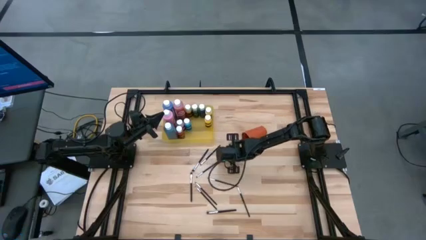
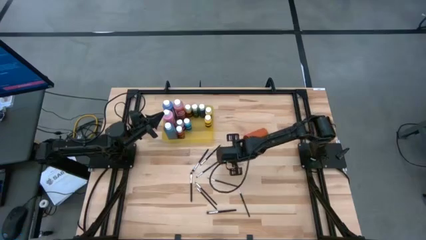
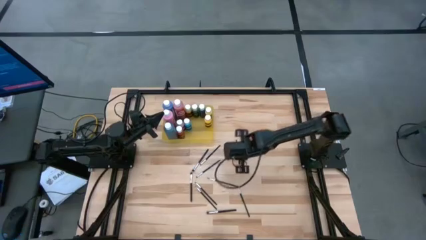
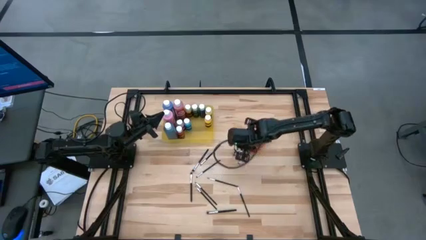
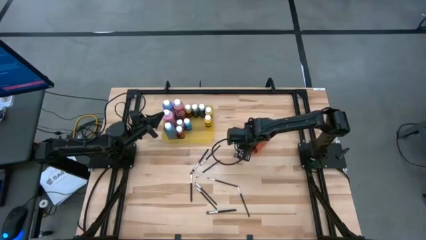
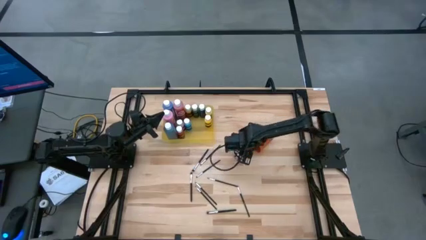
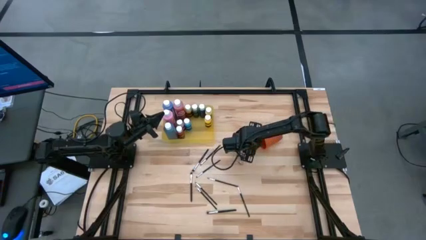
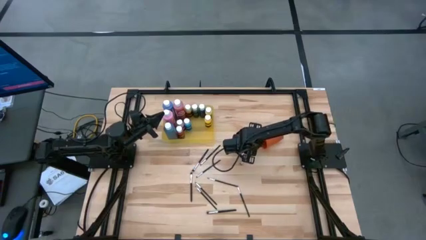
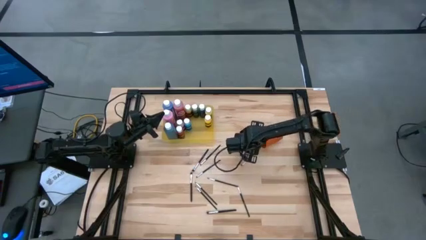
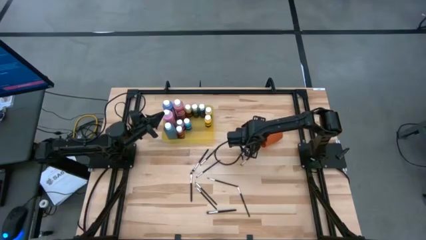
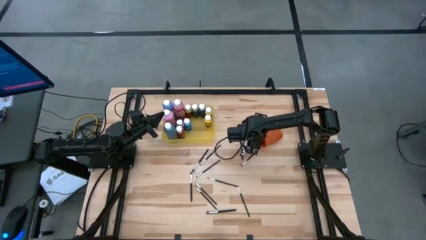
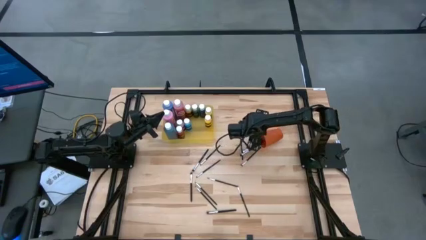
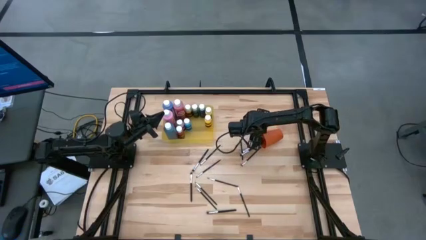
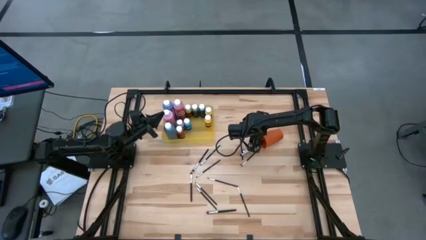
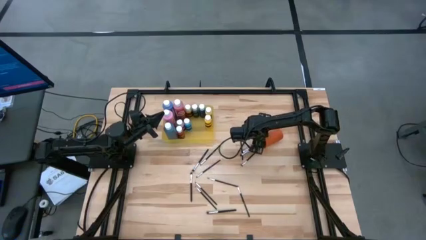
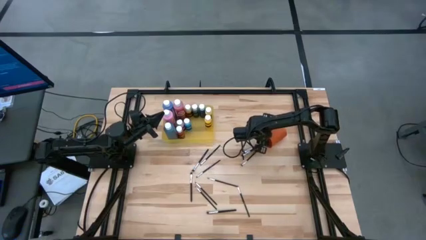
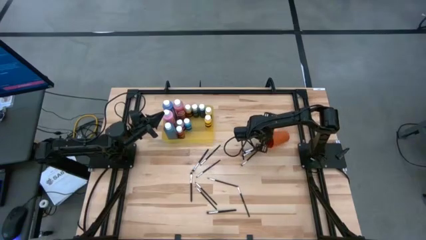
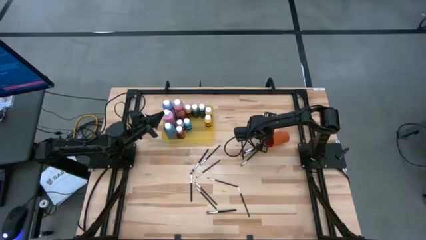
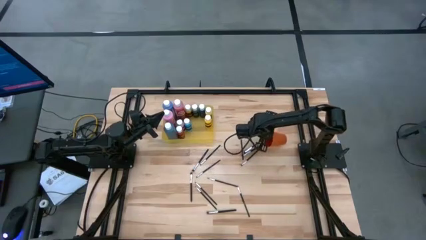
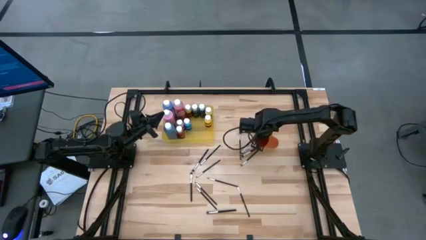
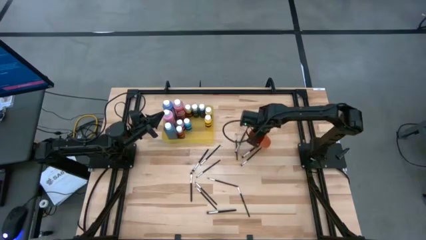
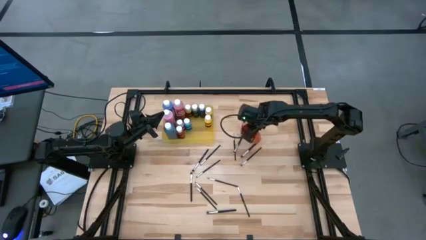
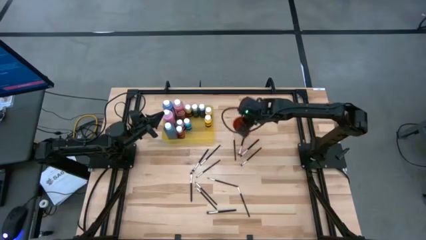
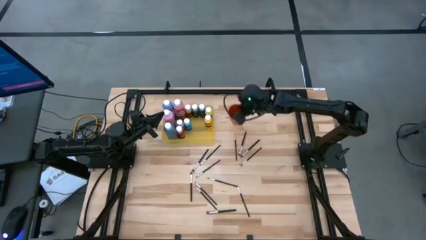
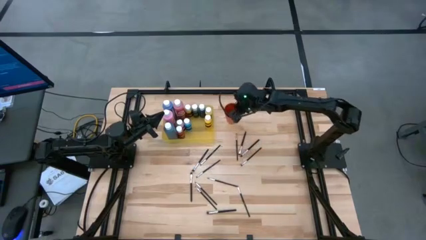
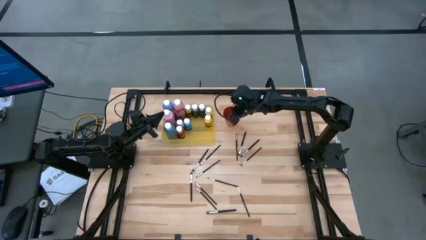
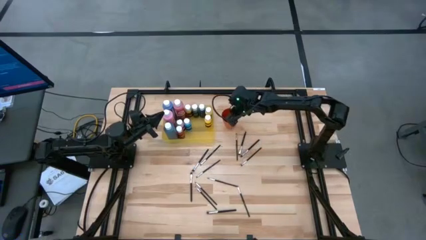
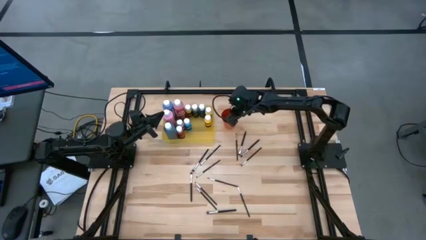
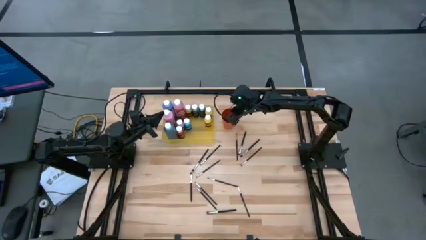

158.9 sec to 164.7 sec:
Task: Pick & Place Paint Supplies
Adjust the orange cup on the table

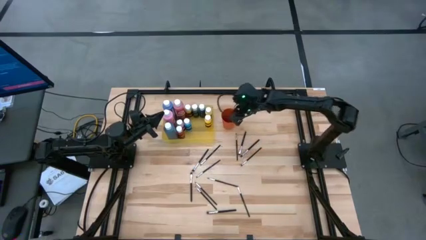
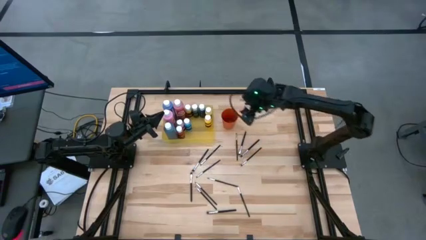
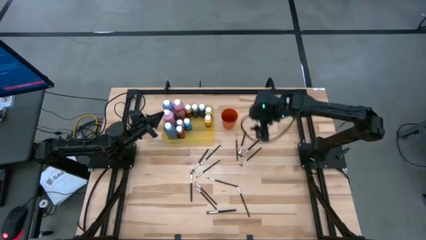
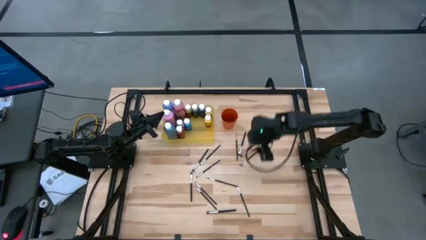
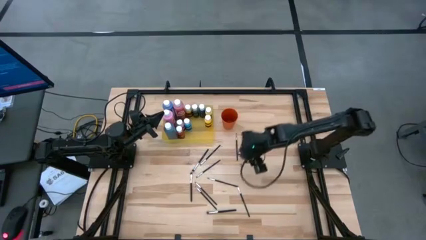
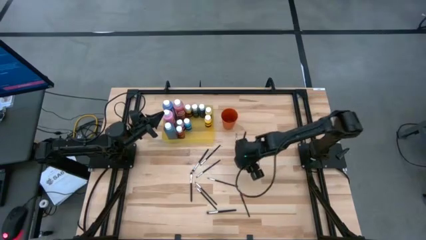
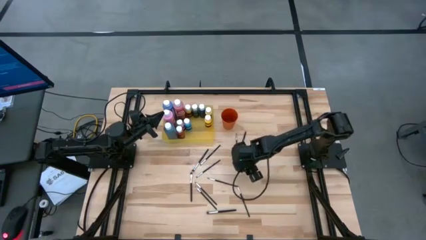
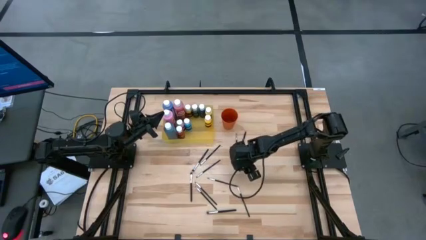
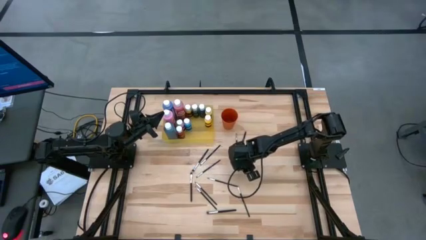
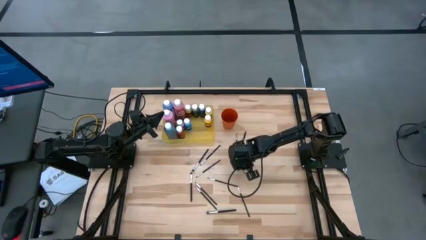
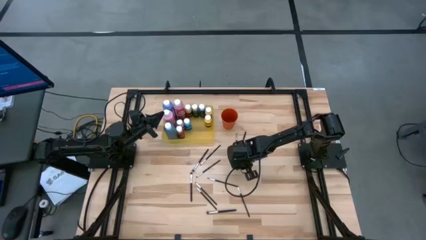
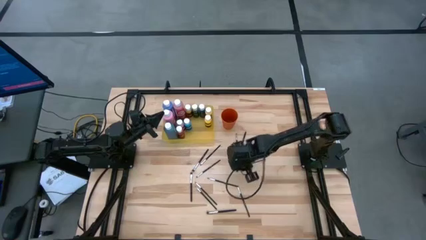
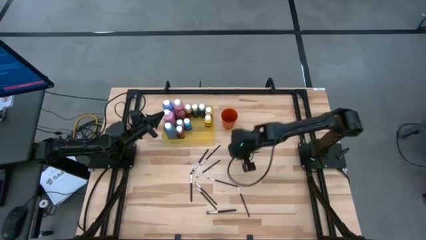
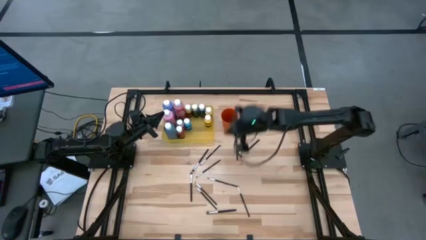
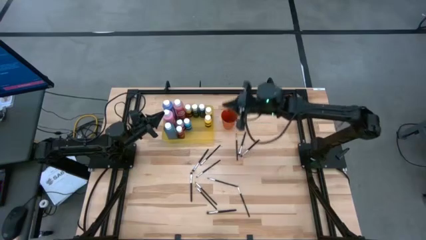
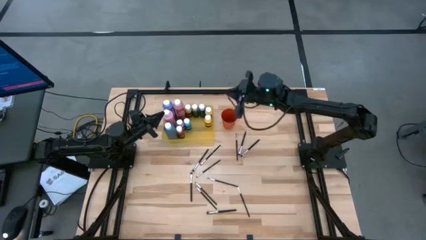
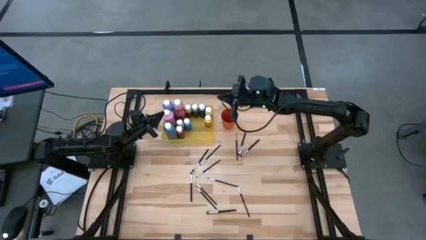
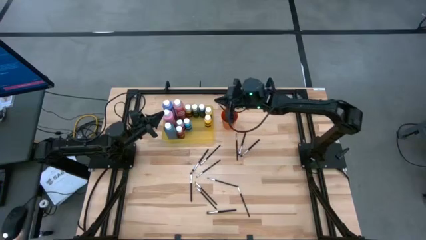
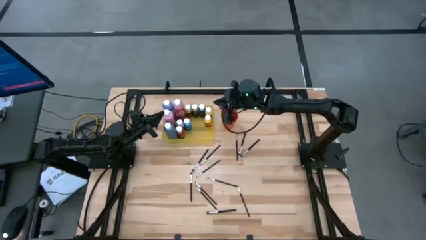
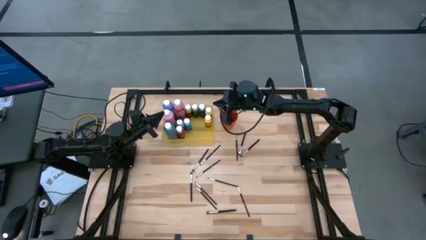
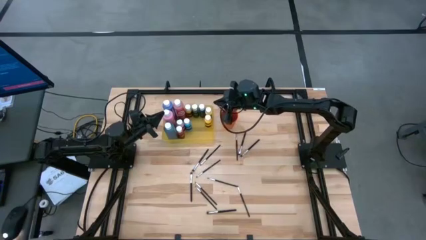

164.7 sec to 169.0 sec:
Put the silver paint brush into the cup

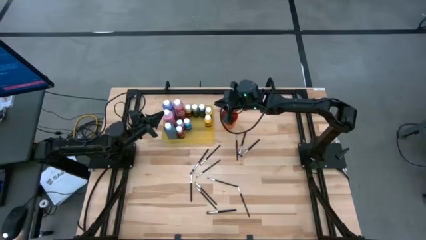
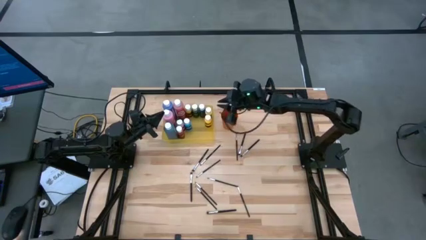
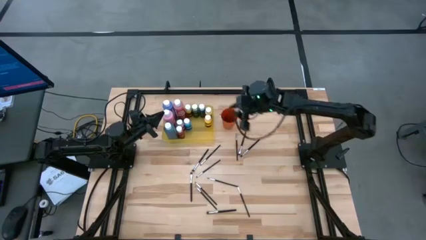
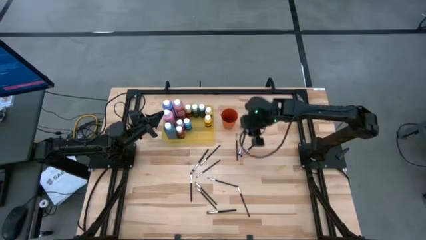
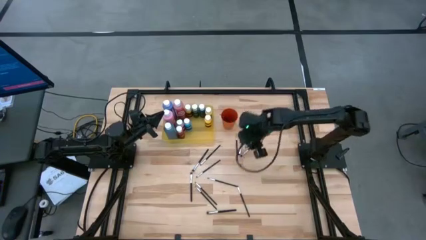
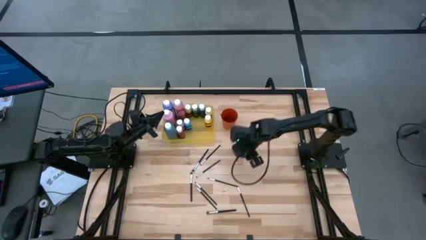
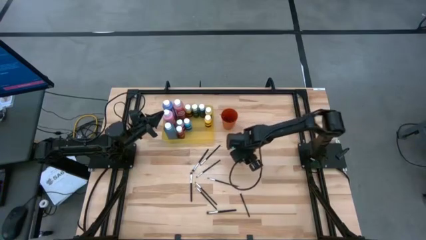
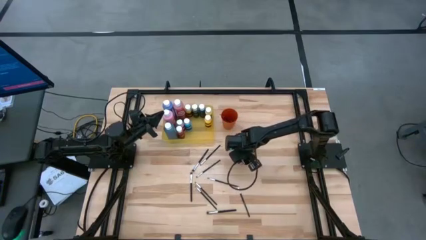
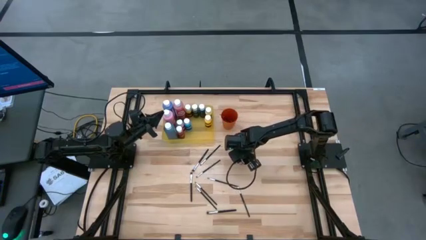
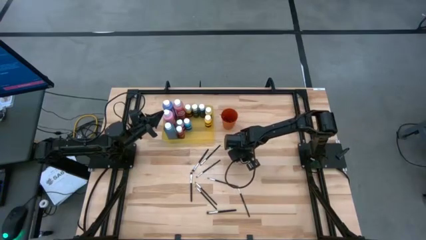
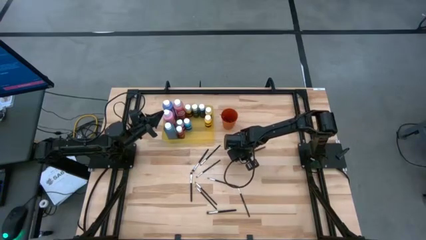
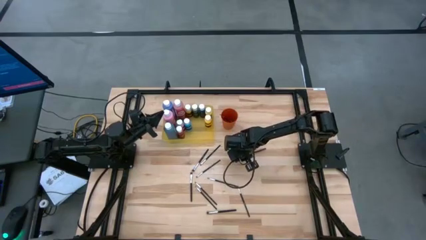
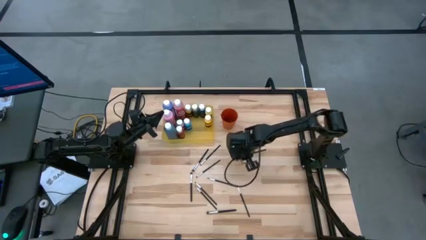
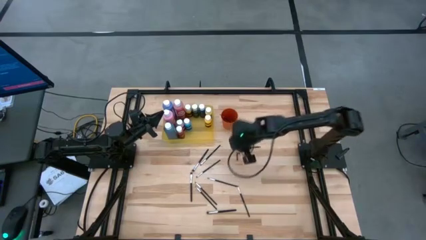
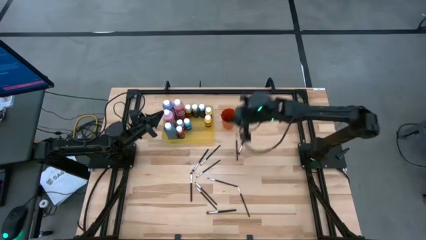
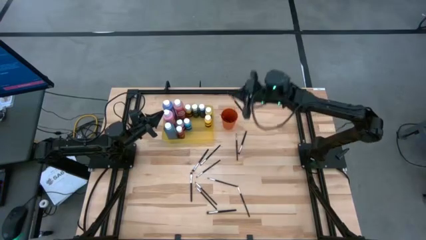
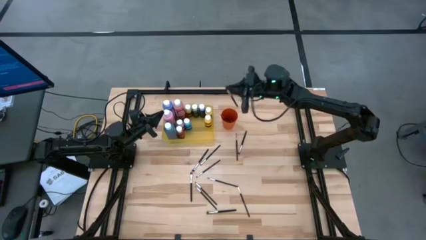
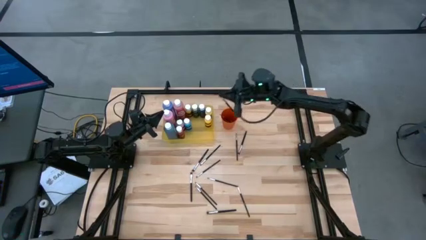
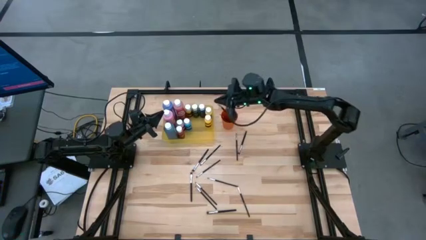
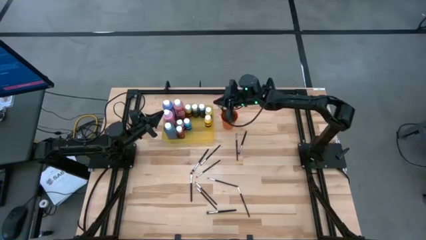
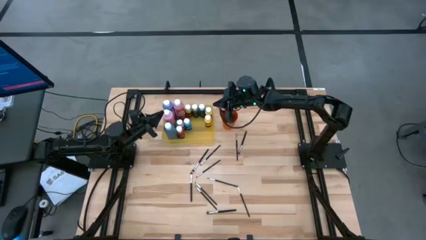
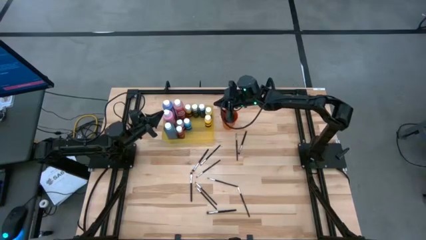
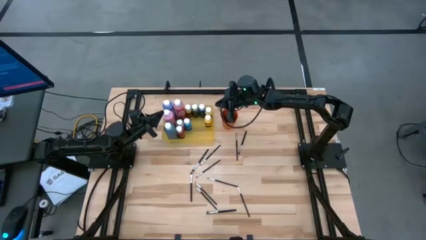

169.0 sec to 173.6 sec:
Put the silver paint brush into the orange cup

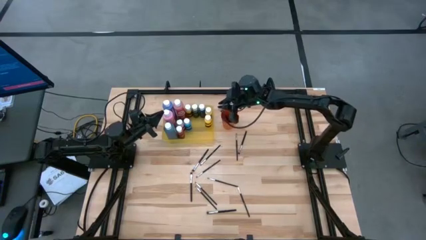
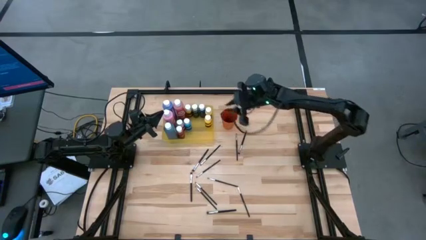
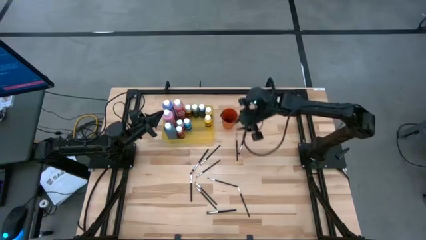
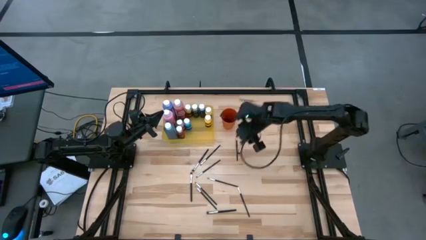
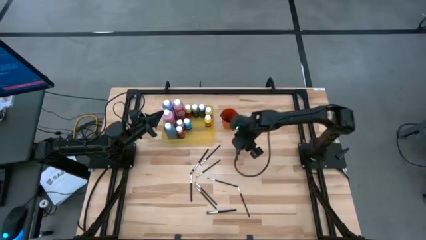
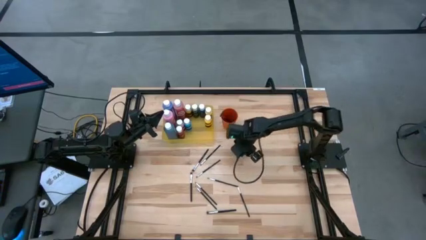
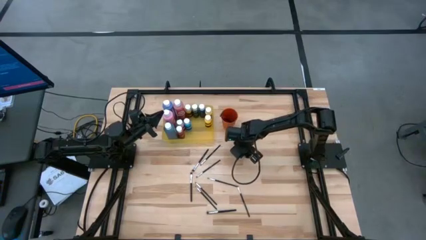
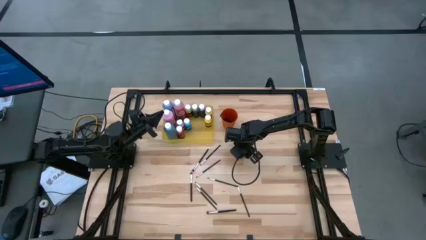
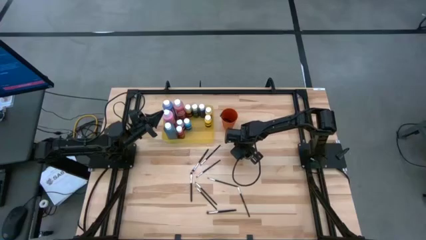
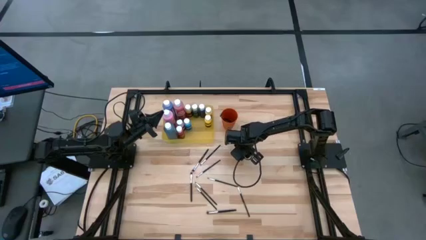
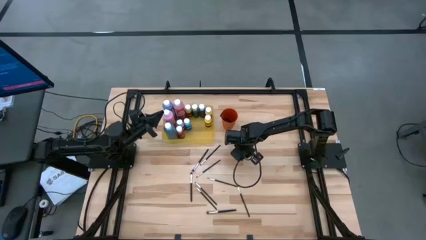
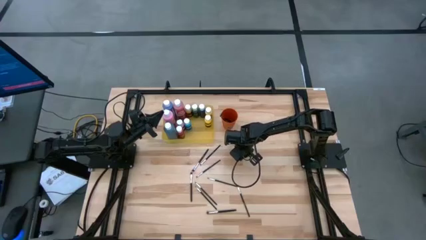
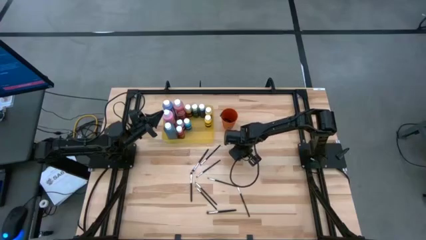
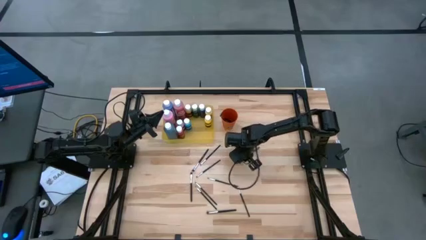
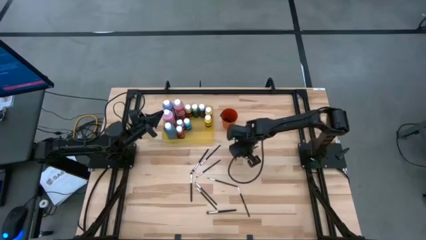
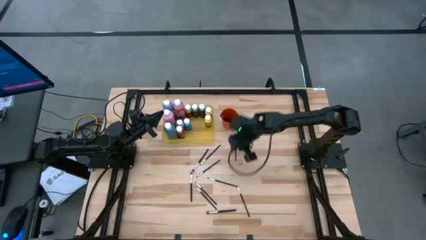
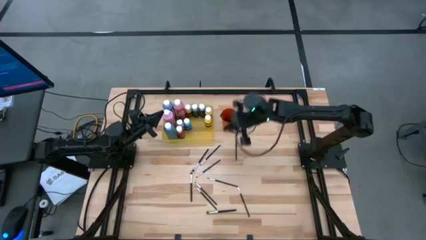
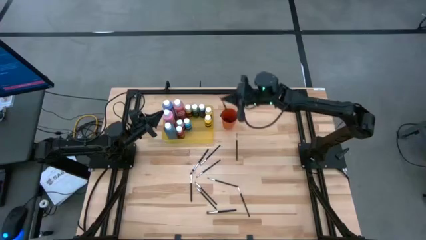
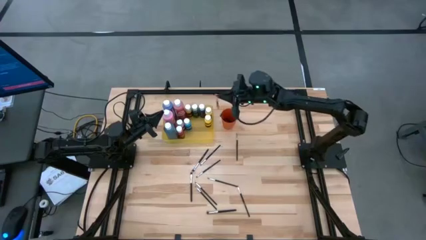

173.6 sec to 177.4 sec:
Put the silver paint brush into the orange cup
